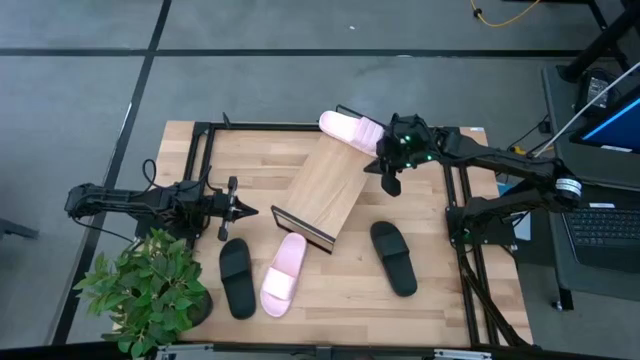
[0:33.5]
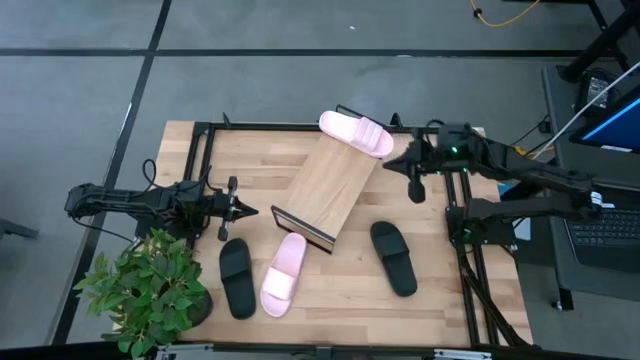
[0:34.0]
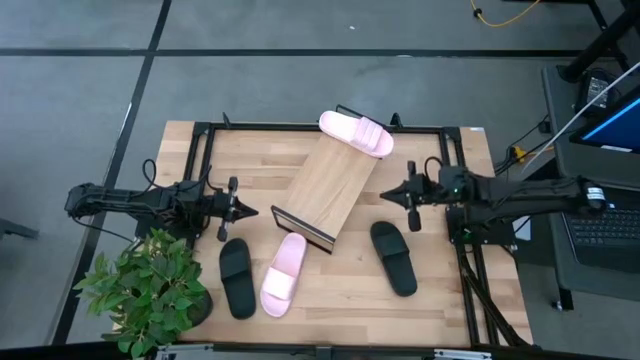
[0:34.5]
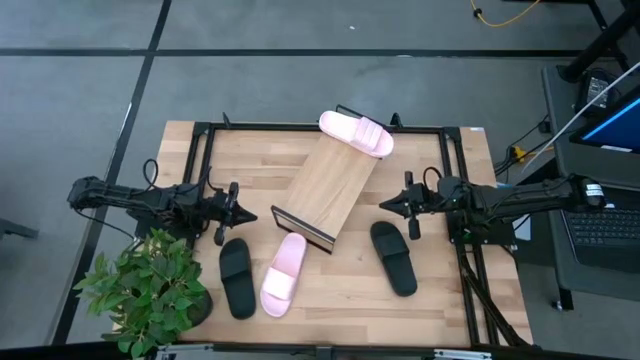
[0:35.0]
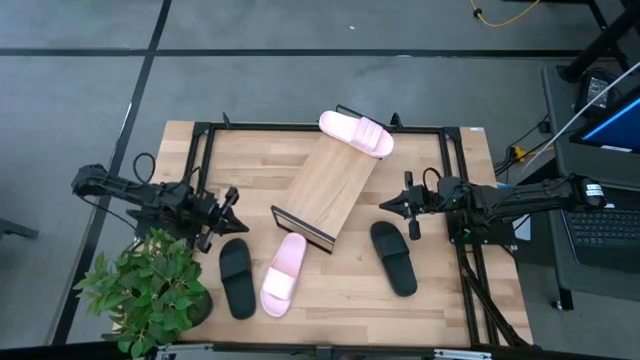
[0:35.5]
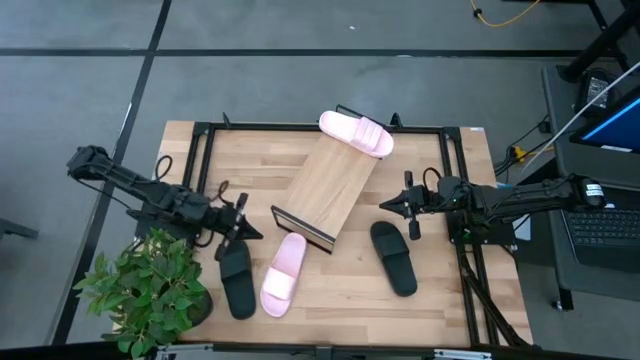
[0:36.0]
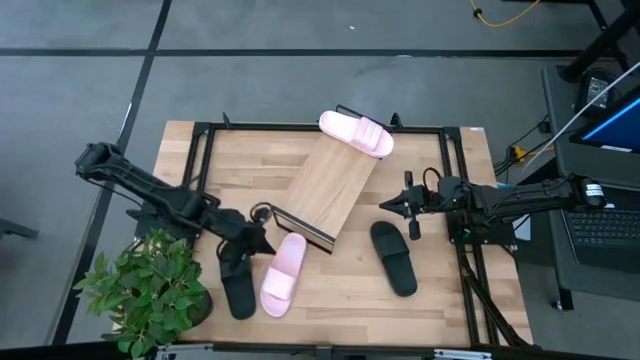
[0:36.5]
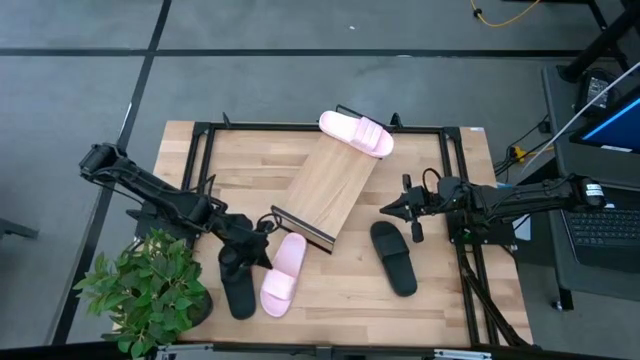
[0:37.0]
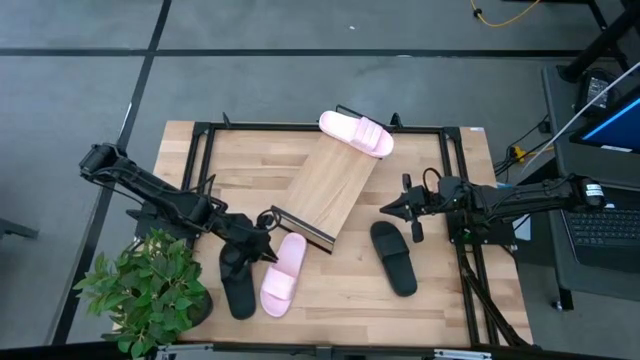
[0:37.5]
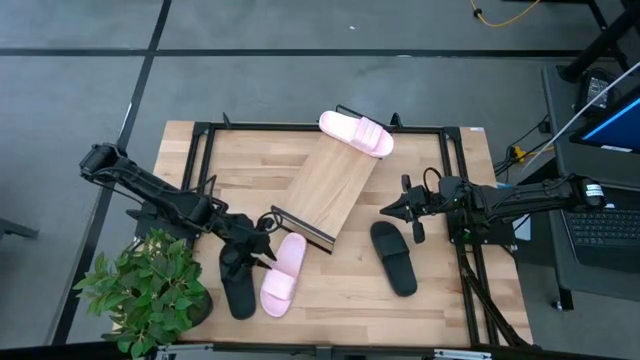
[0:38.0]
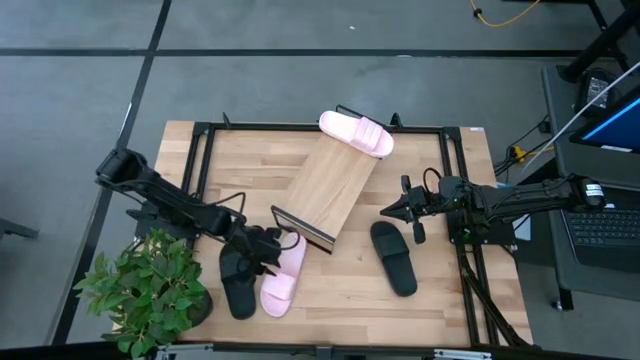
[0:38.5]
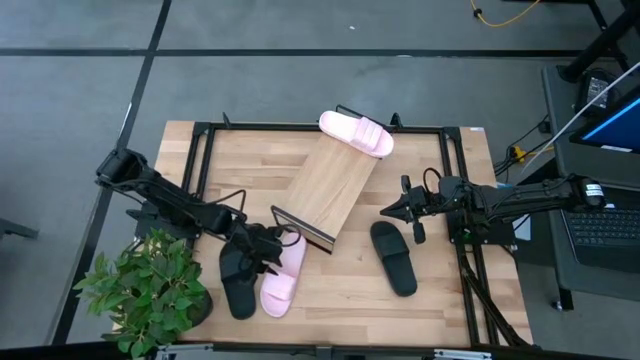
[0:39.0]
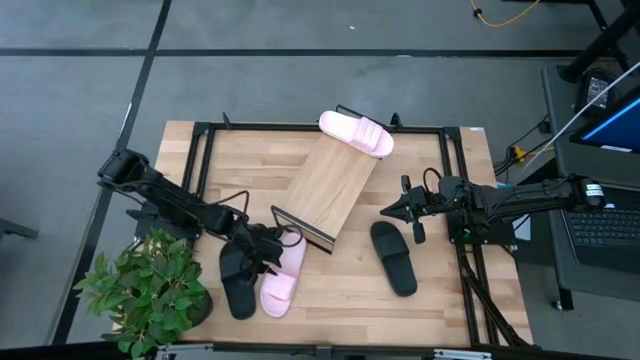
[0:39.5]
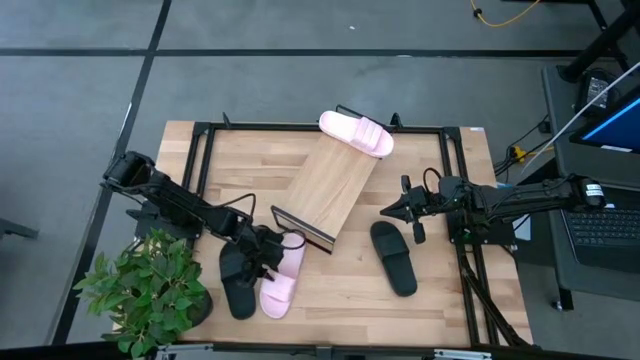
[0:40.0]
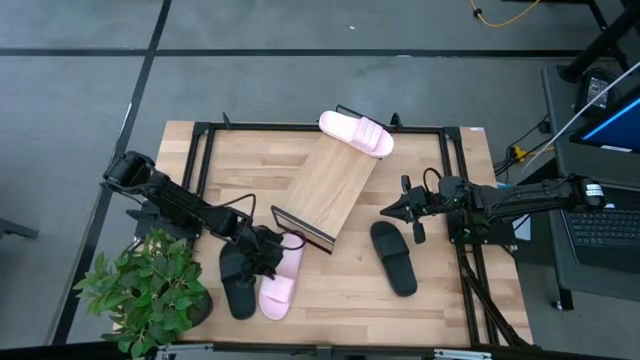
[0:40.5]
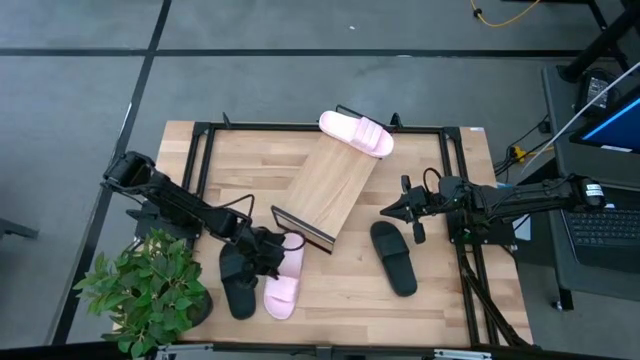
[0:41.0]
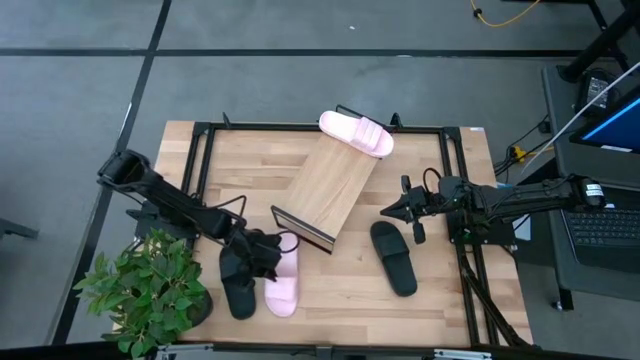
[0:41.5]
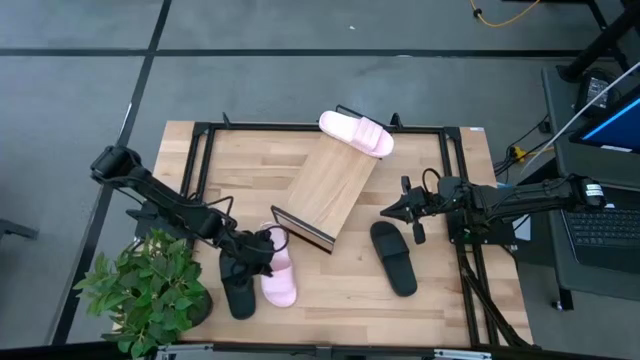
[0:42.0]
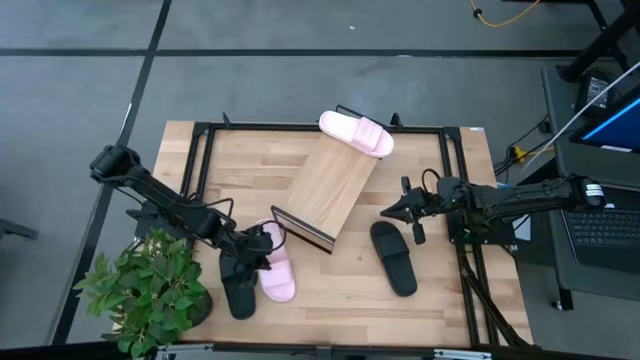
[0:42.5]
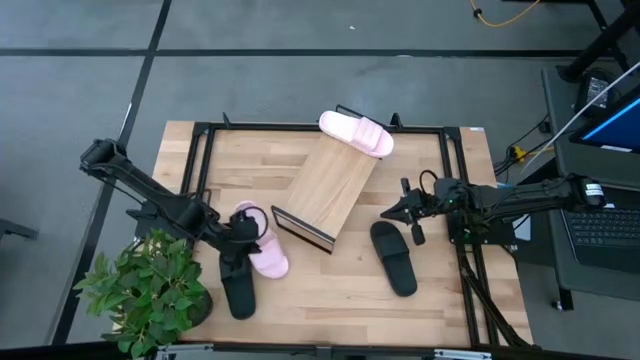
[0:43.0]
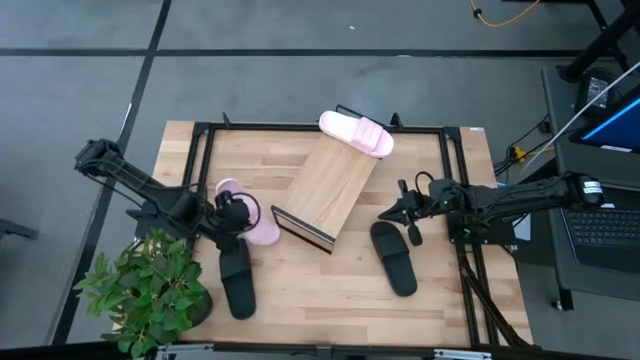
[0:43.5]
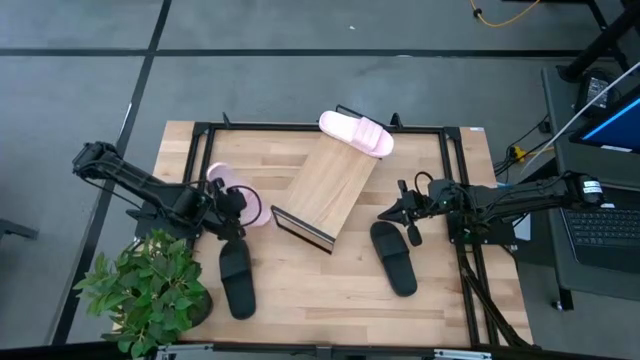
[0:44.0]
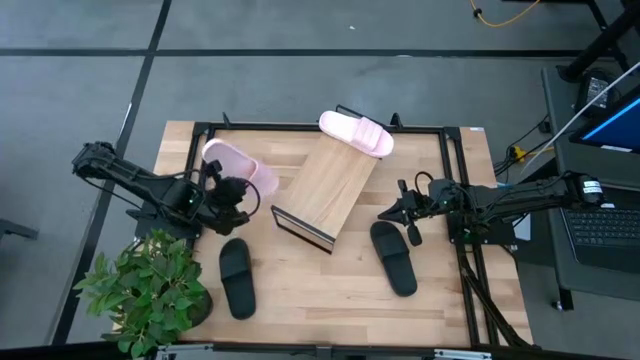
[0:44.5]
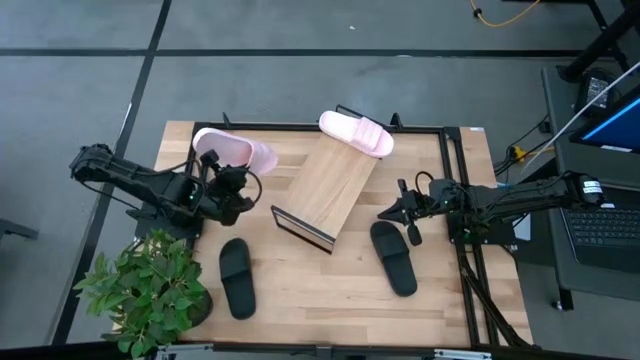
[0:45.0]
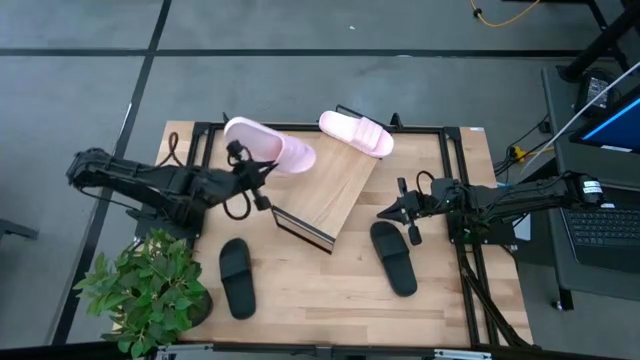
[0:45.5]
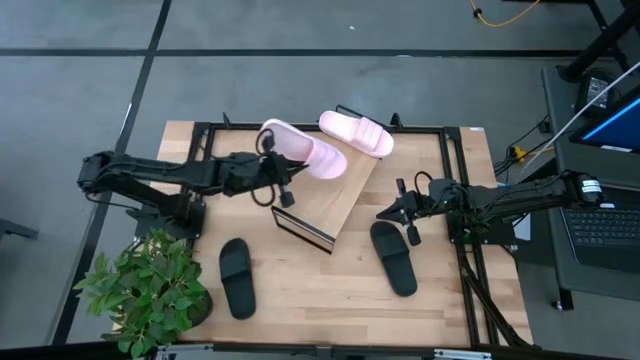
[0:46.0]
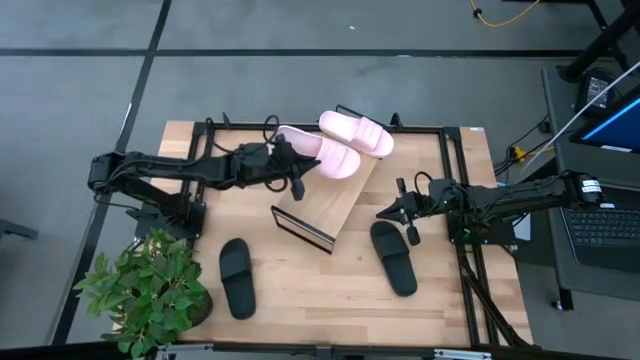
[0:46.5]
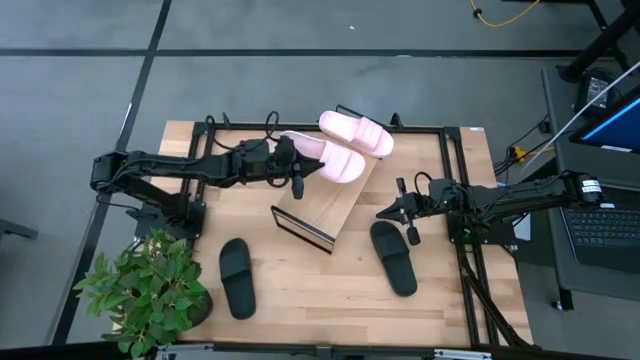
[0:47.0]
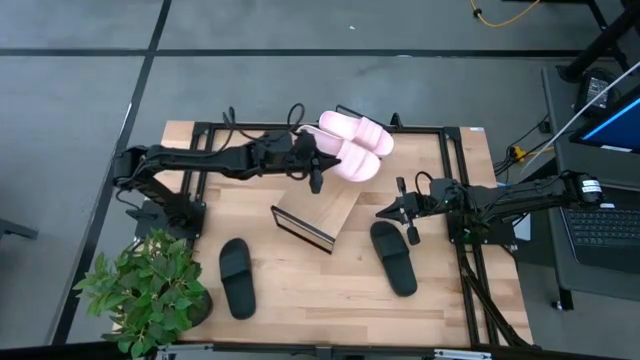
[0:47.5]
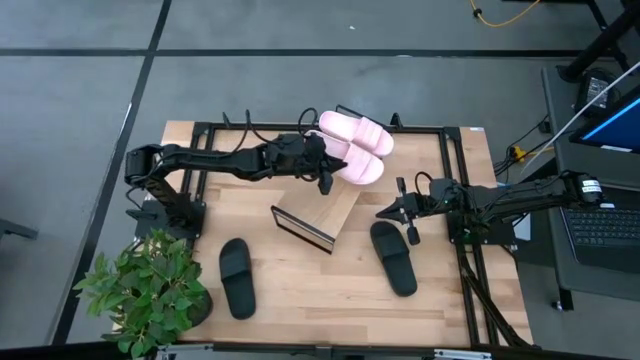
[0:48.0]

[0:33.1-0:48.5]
Task: Pick and place slides into the shelf
Put the left pink slide on the shelf

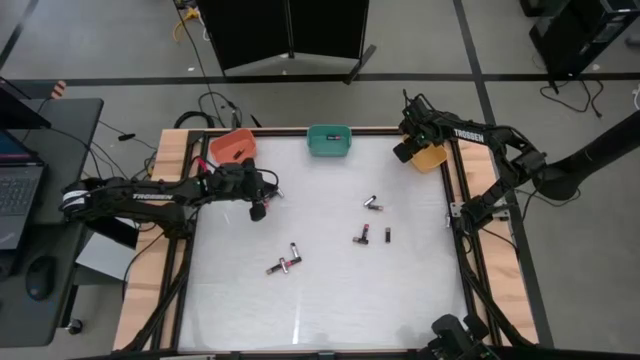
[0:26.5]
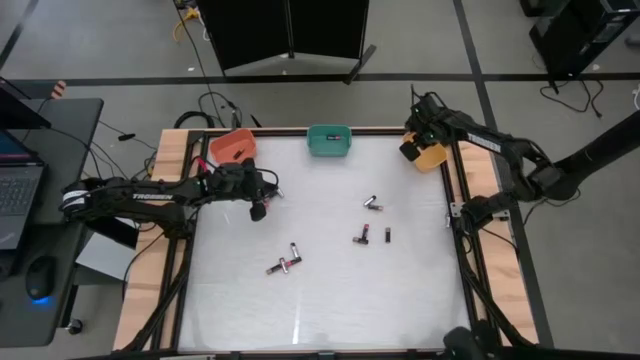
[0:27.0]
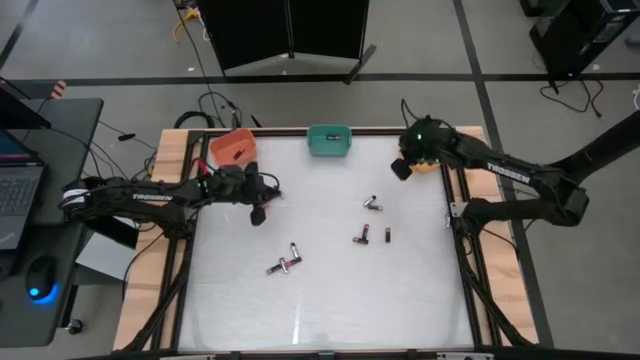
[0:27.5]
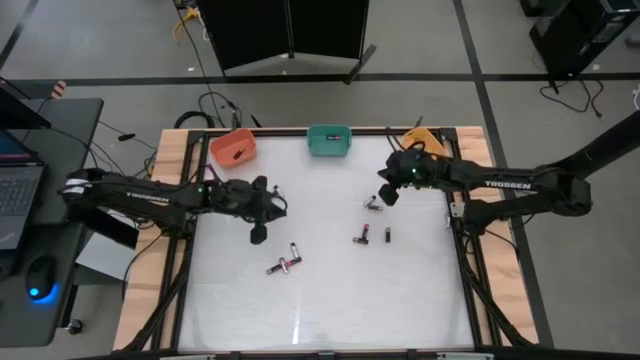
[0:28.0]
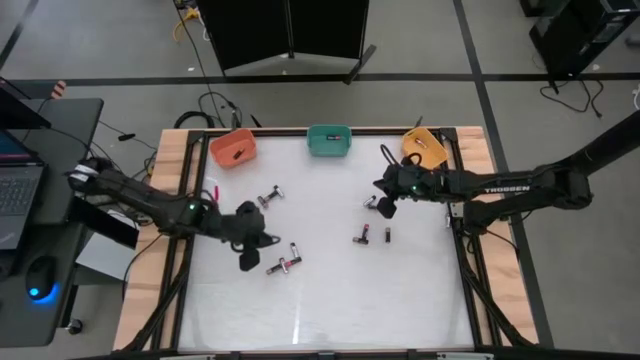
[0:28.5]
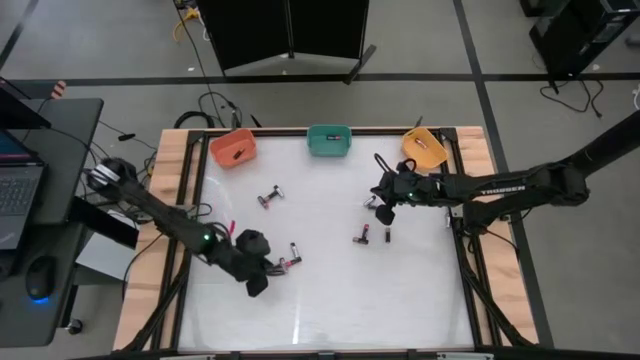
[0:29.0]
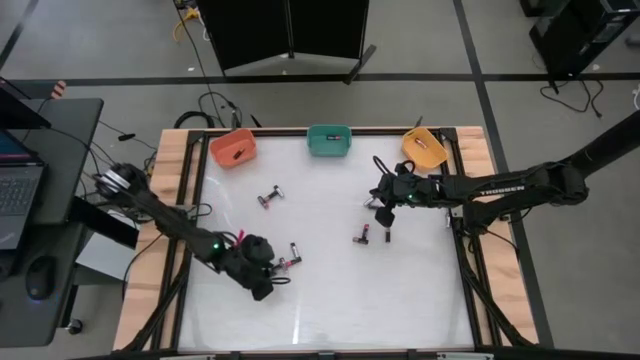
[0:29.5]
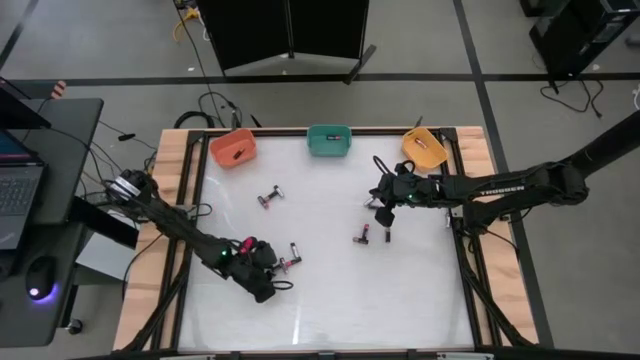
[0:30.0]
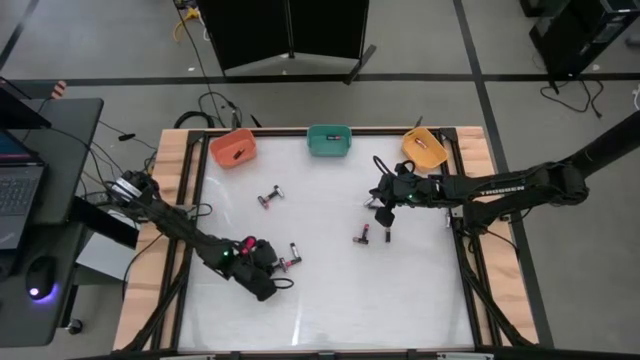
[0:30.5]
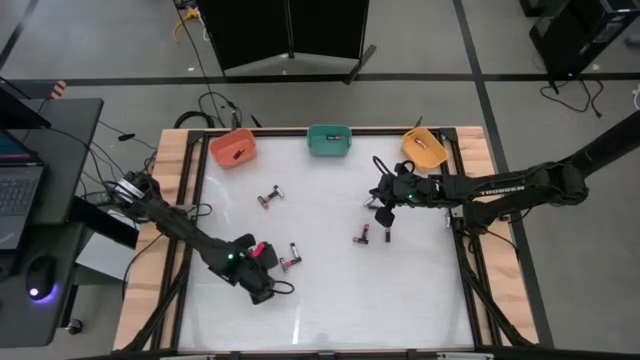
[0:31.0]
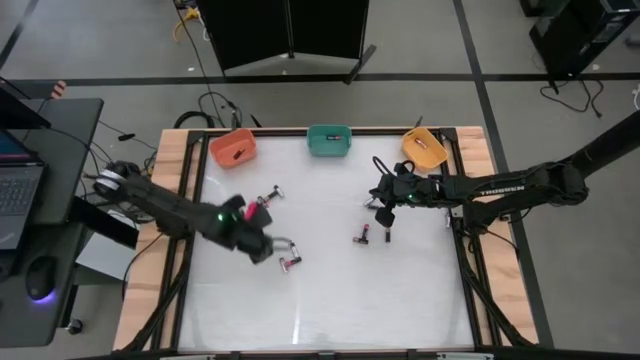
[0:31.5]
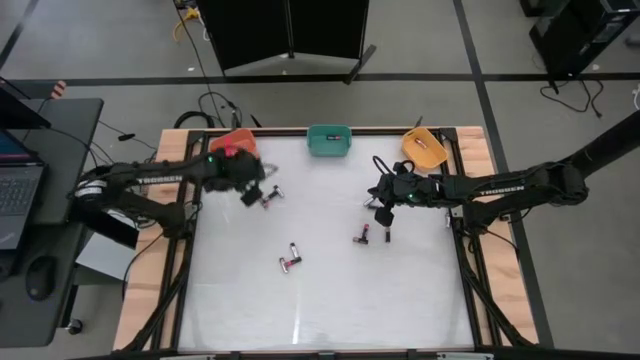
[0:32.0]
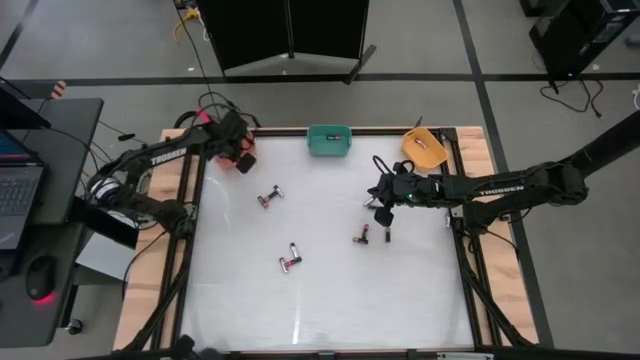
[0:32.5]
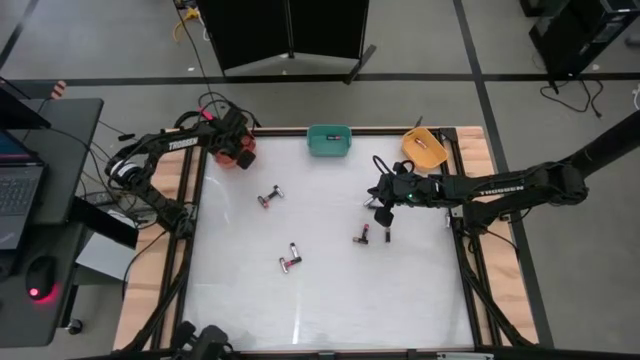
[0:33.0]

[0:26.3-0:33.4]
Task: Sort batteries
Put the brown battery into the orange bin
